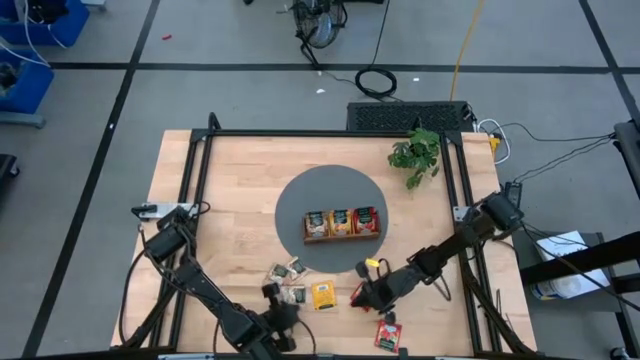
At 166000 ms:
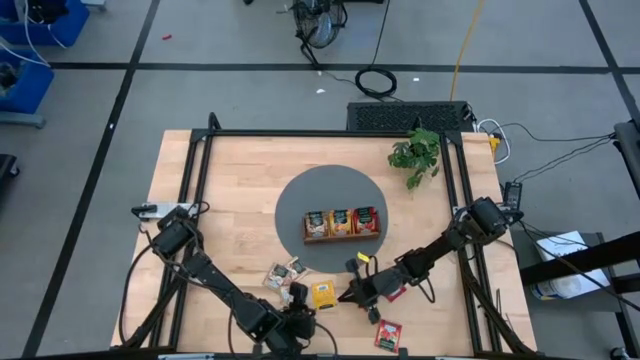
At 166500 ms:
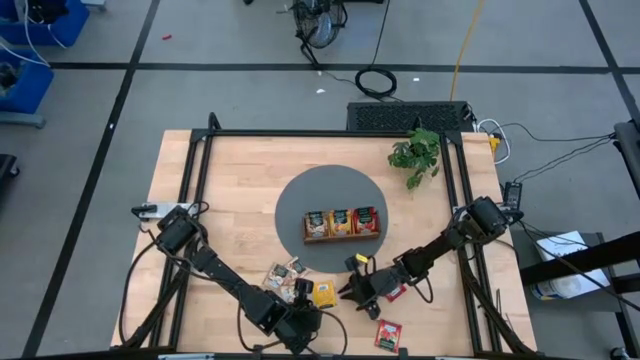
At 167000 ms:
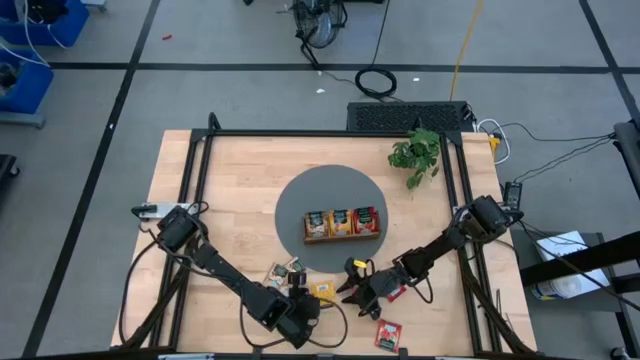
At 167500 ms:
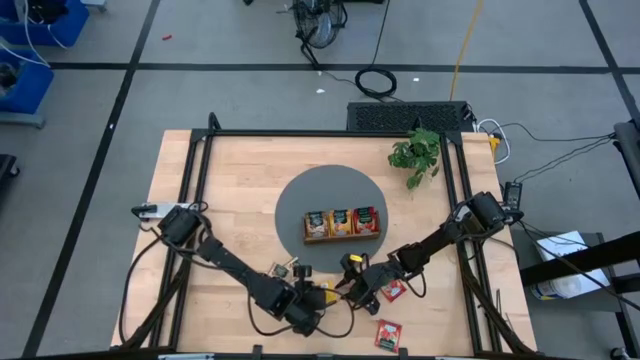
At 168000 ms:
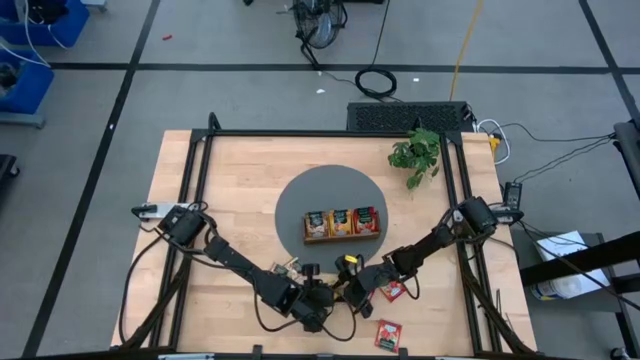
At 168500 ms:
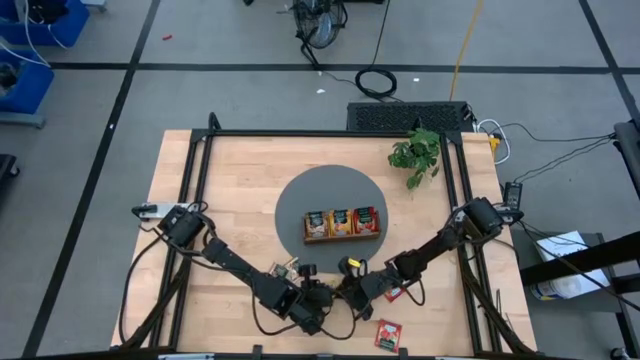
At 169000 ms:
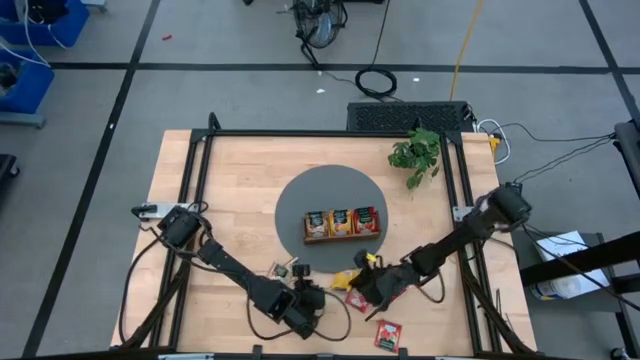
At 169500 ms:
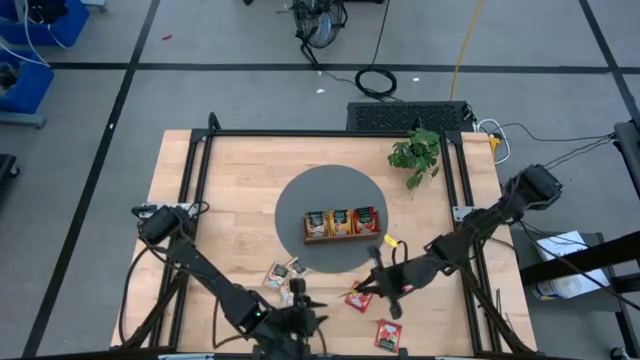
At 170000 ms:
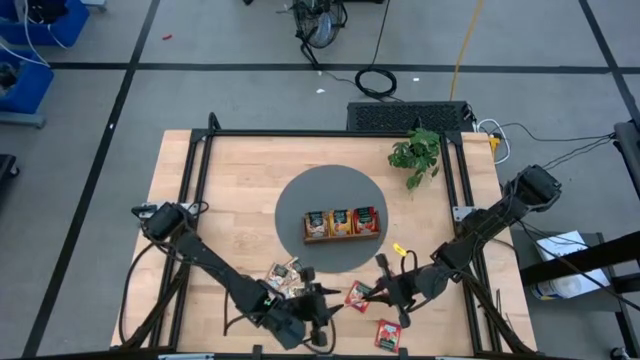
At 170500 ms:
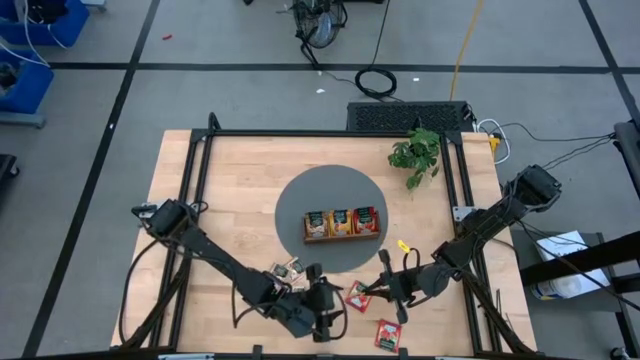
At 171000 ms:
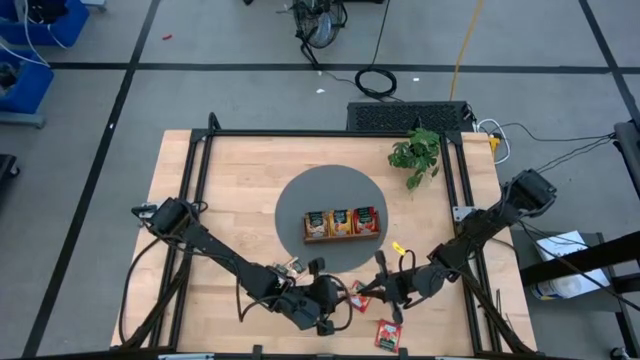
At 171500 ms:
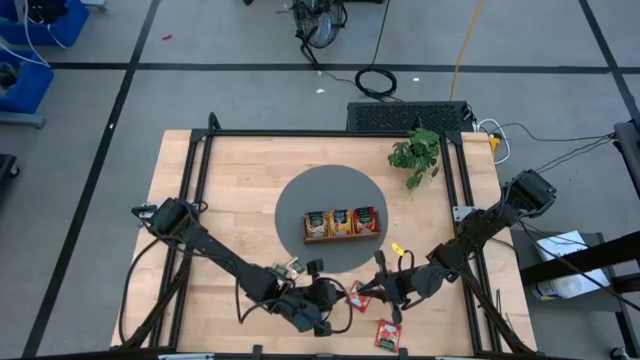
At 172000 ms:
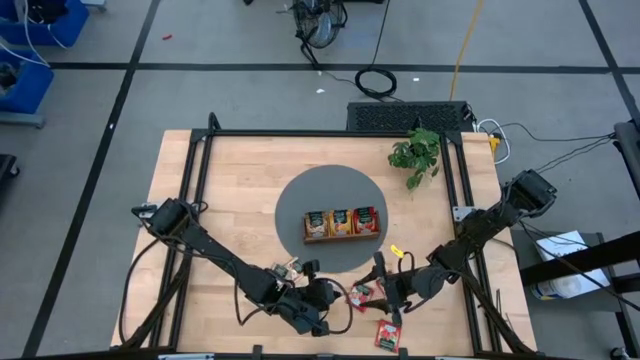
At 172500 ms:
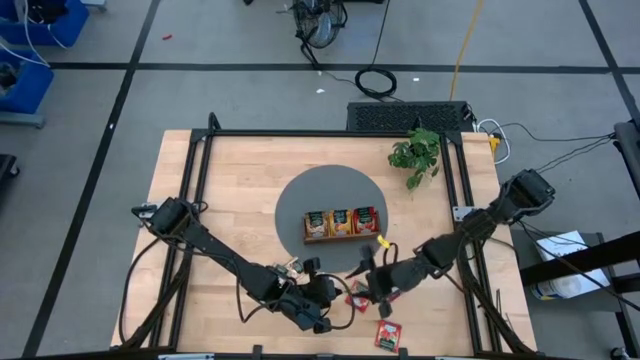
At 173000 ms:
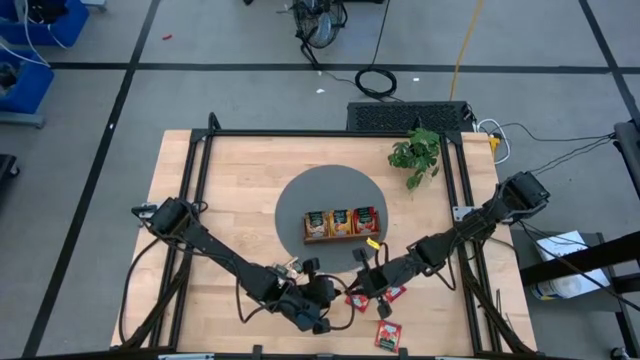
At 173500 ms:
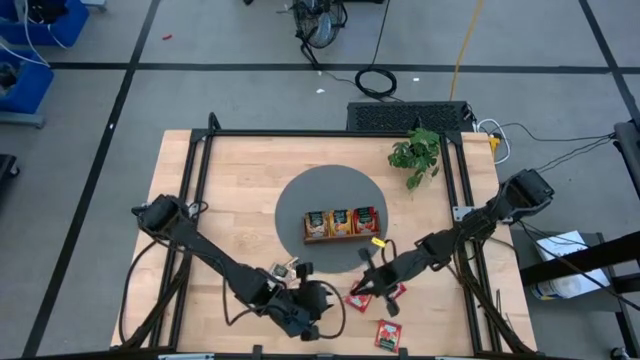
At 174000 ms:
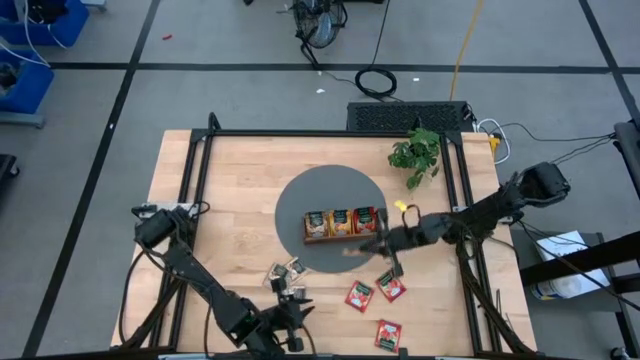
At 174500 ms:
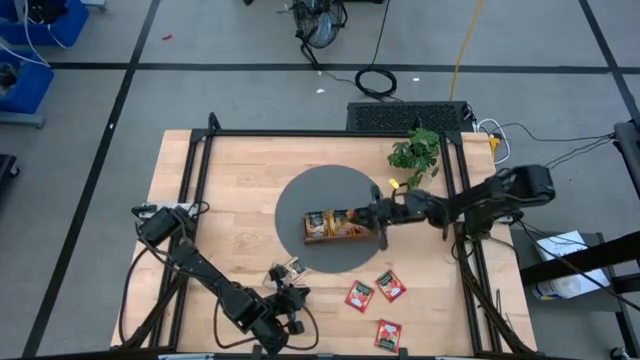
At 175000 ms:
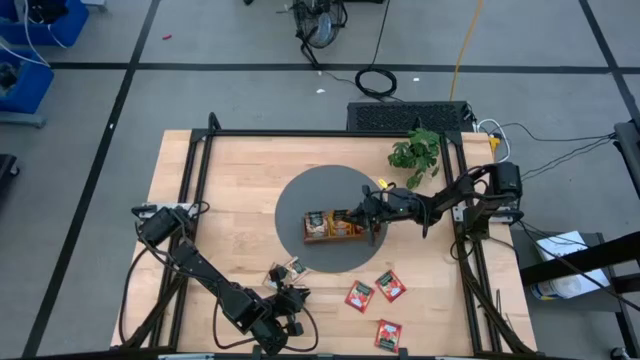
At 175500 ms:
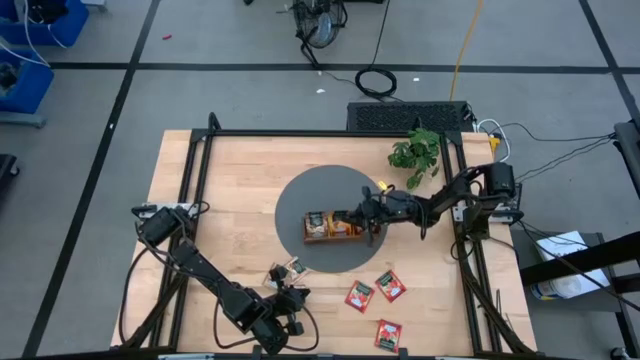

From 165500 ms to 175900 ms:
Task: Pick & Place Tea
Put the orange tea bag into the middle slot of the wooden organizer

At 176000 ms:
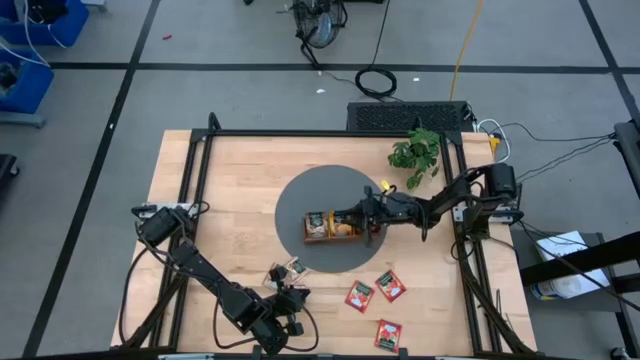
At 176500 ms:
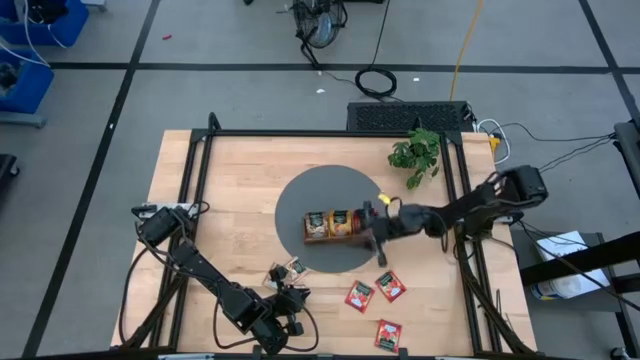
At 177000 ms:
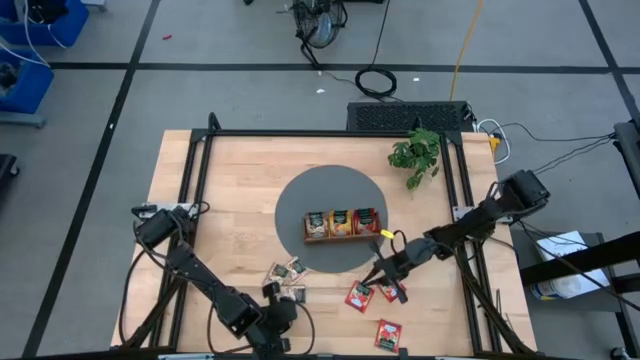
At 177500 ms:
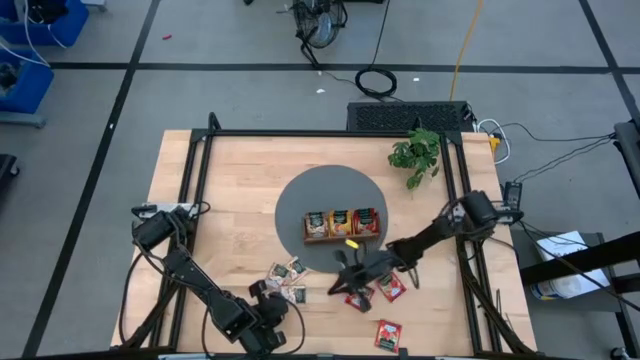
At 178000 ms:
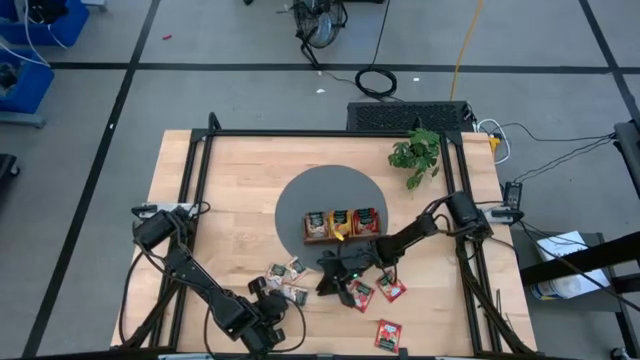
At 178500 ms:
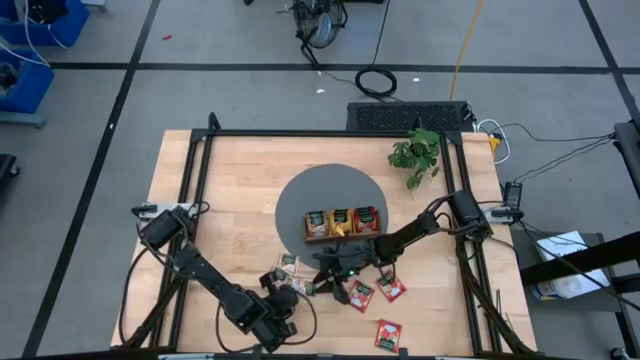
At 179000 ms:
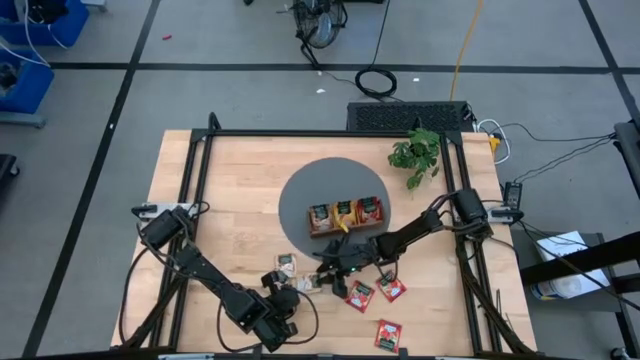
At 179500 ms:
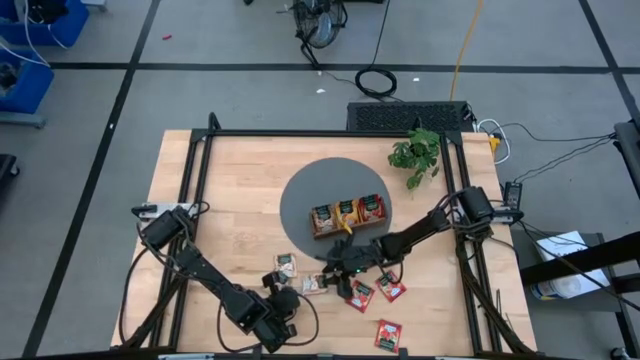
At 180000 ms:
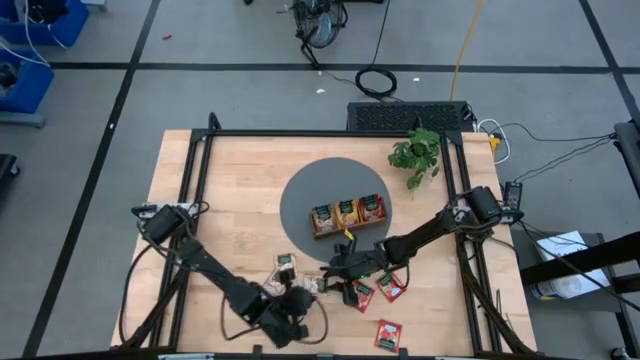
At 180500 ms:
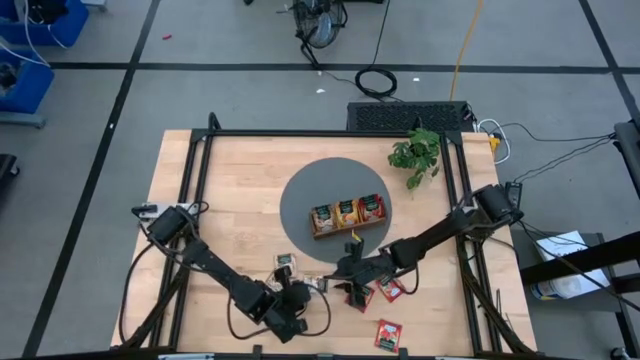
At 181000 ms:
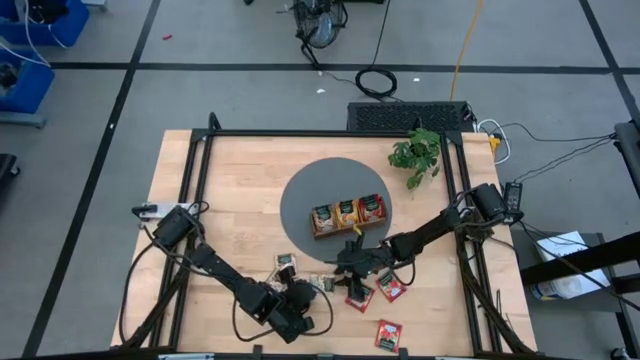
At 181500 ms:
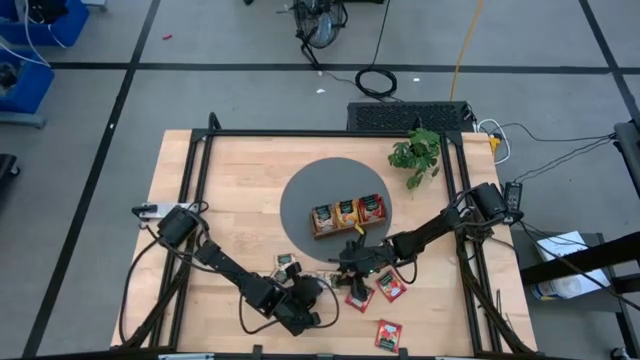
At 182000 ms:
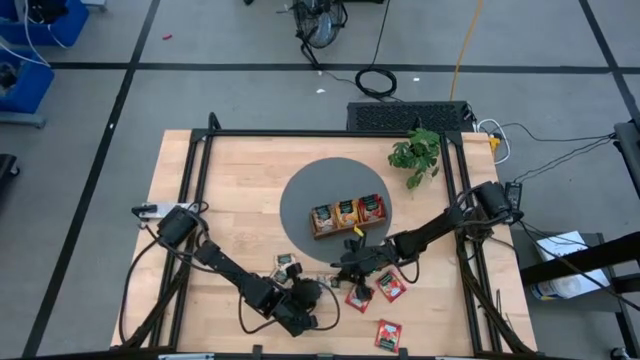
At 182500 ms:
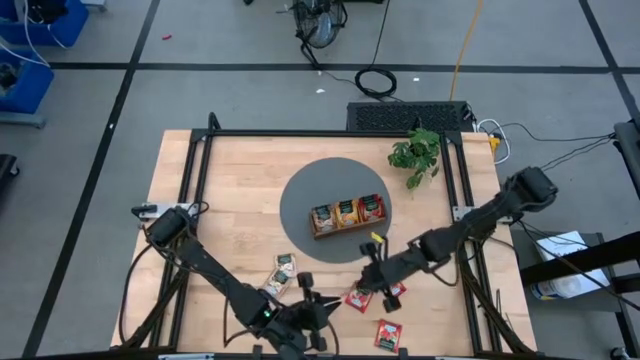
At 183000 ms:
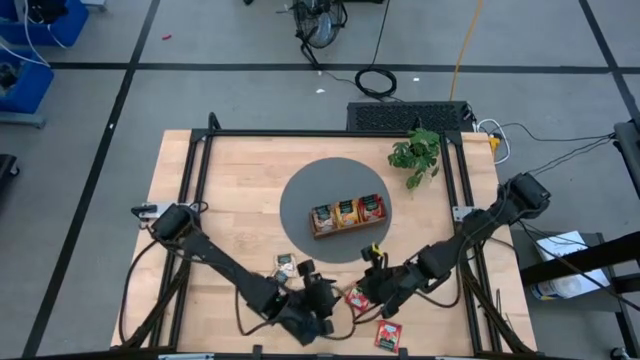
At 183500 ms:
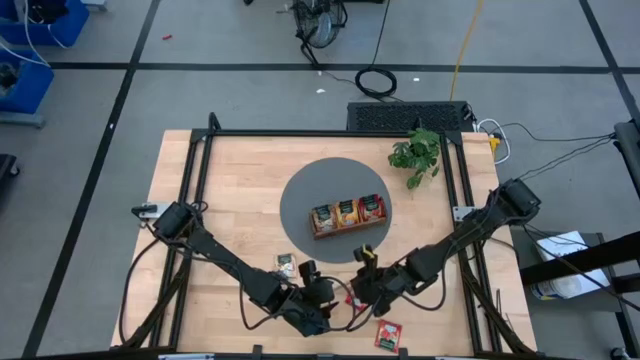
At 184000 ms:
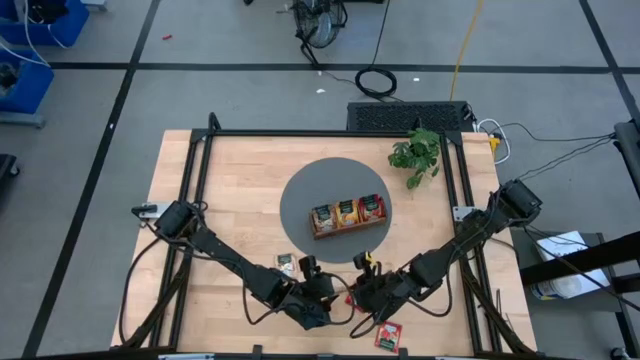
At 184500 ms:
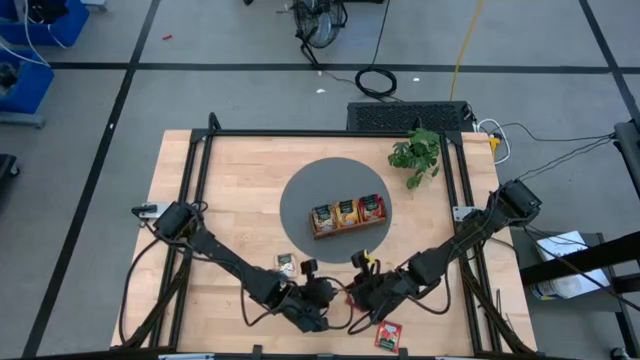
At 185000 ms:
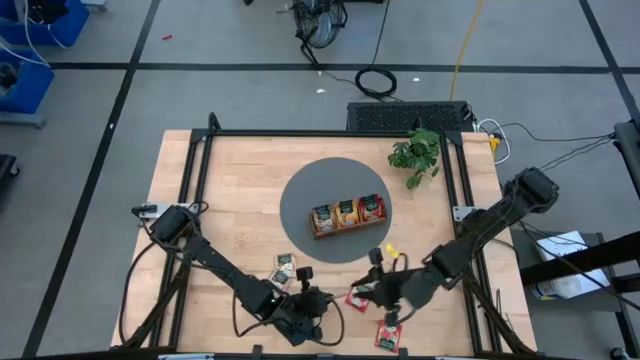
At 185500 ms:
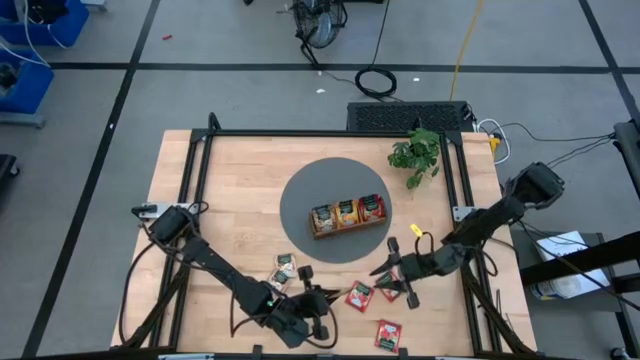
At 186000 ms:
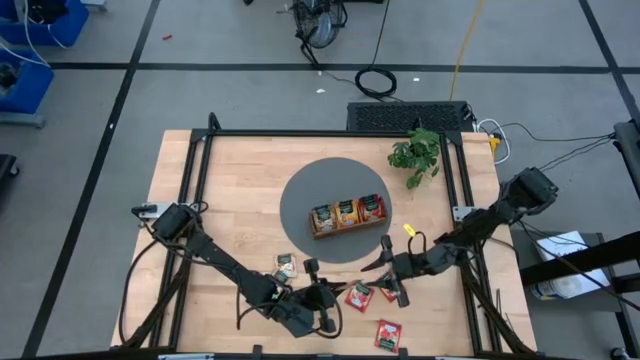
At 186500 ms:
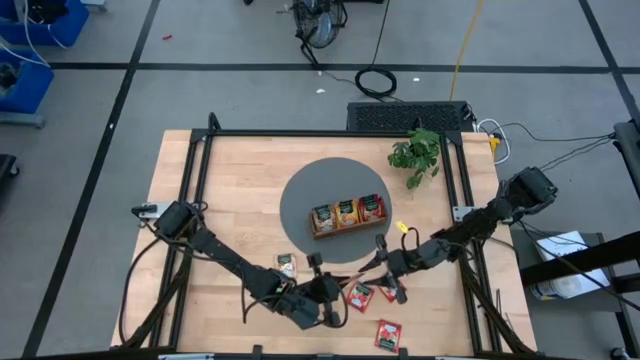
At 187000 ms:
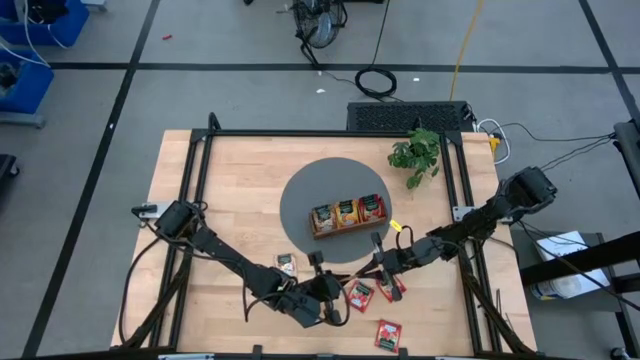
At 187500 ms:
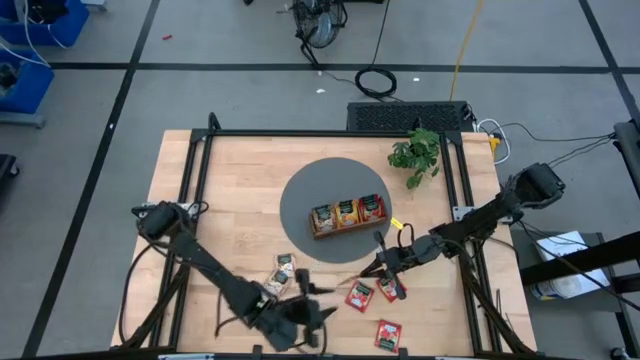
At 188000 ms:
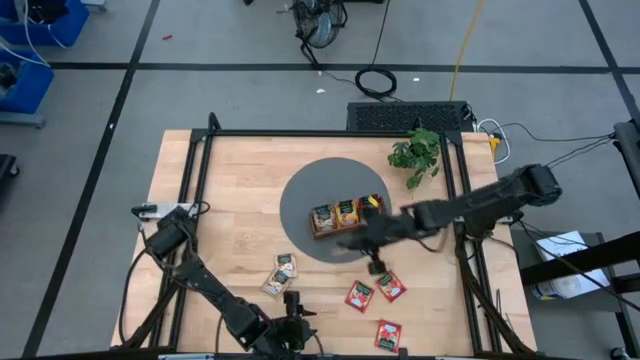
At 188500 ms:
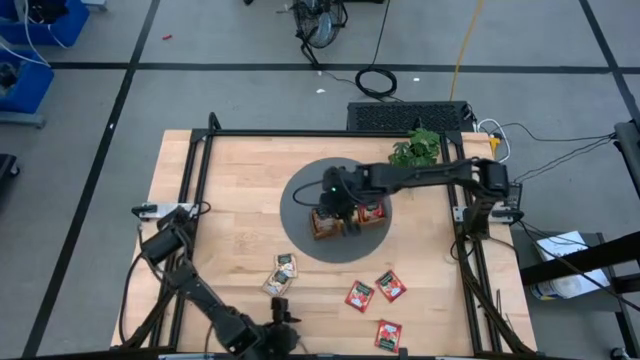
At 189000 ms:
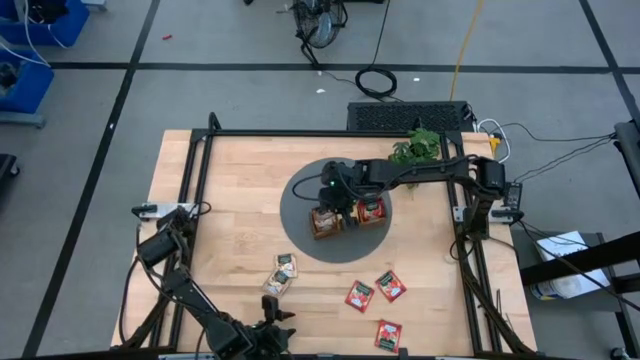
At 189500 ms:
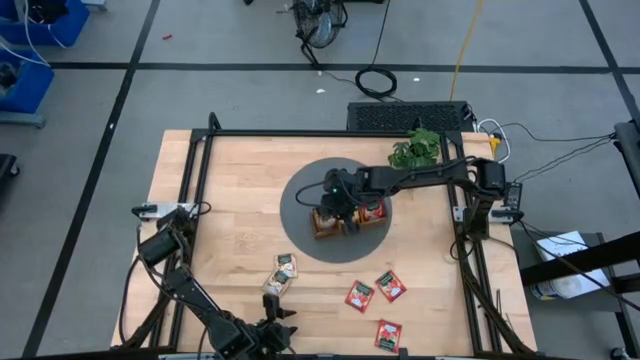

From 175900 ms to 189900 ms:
Put the bottom brown tea bag into the left slot of the wooden organizer
